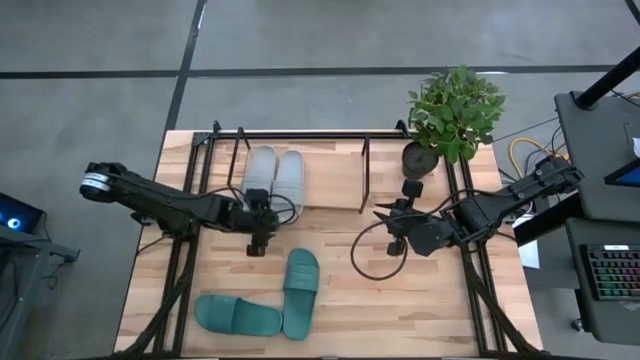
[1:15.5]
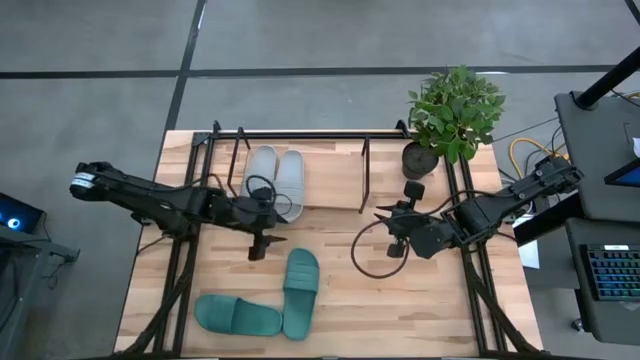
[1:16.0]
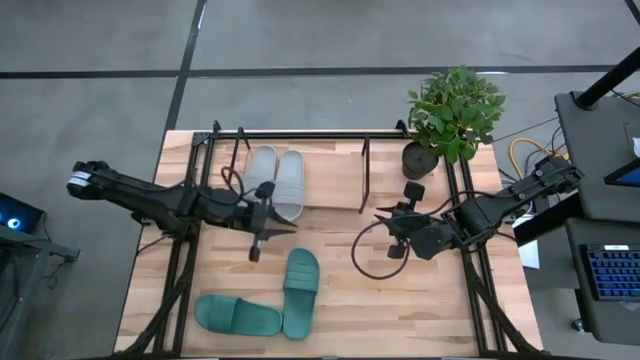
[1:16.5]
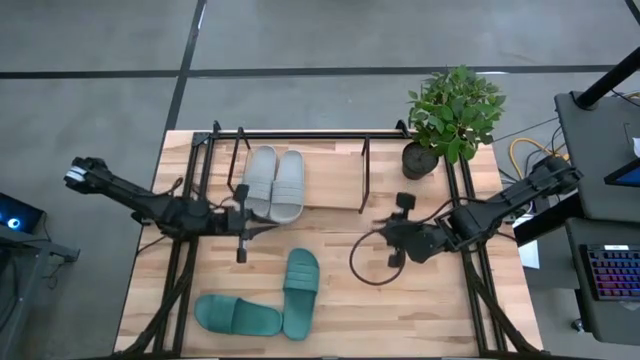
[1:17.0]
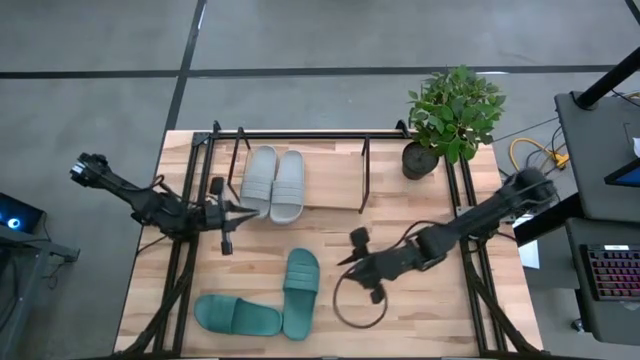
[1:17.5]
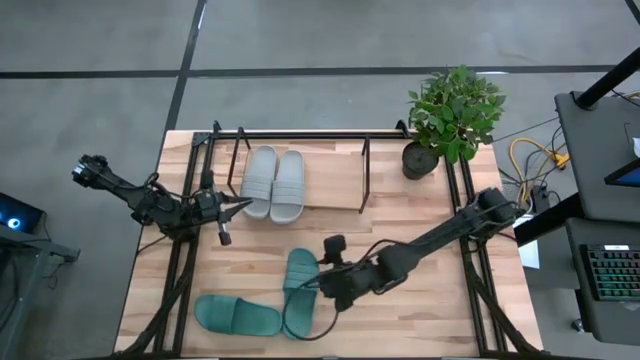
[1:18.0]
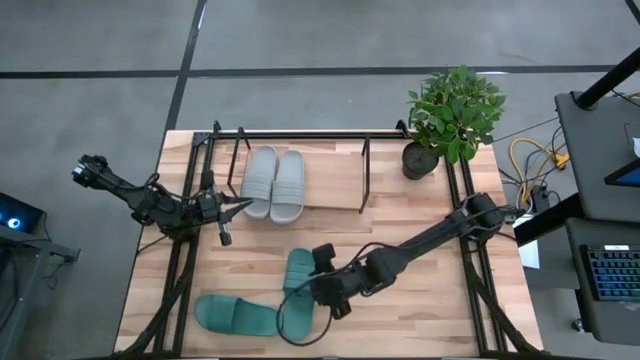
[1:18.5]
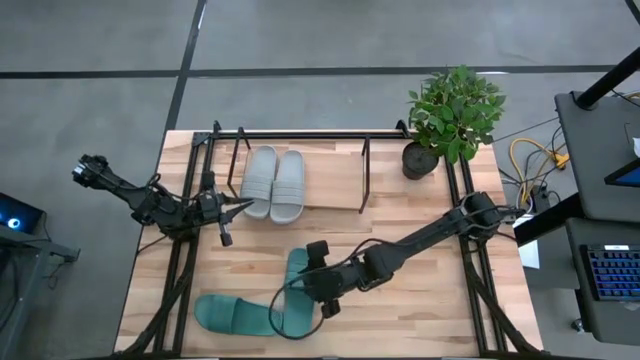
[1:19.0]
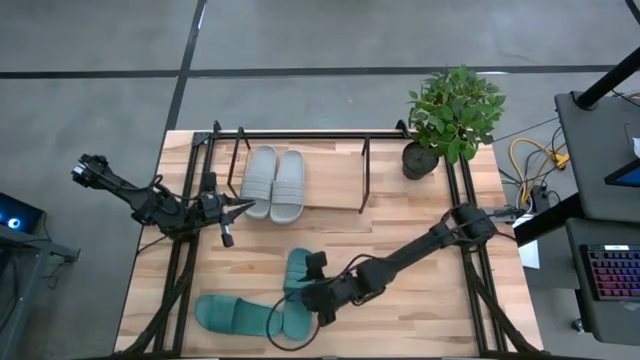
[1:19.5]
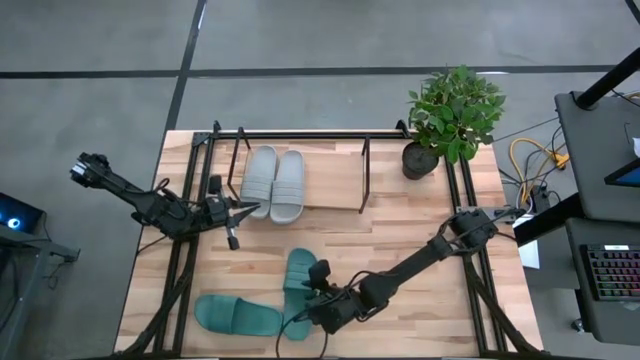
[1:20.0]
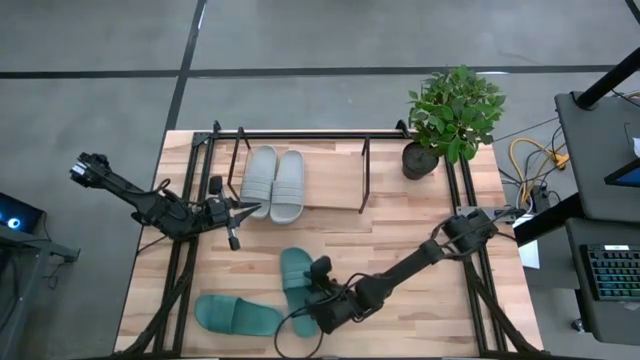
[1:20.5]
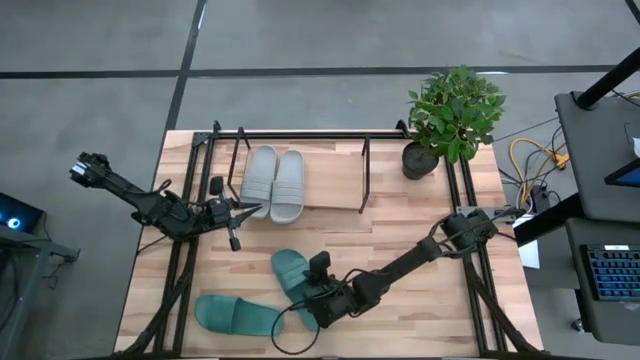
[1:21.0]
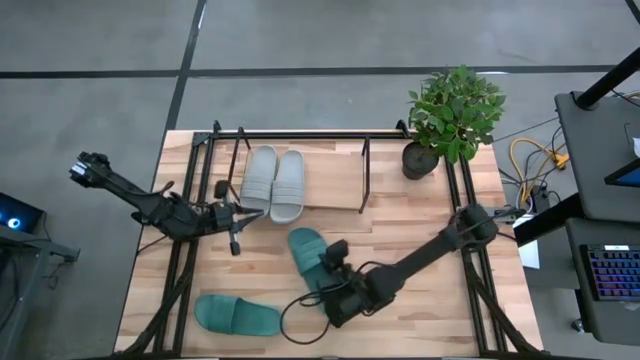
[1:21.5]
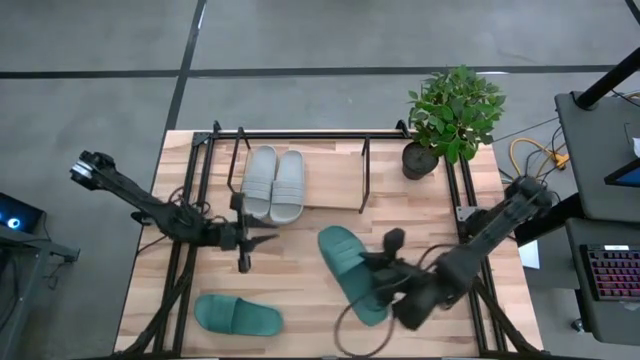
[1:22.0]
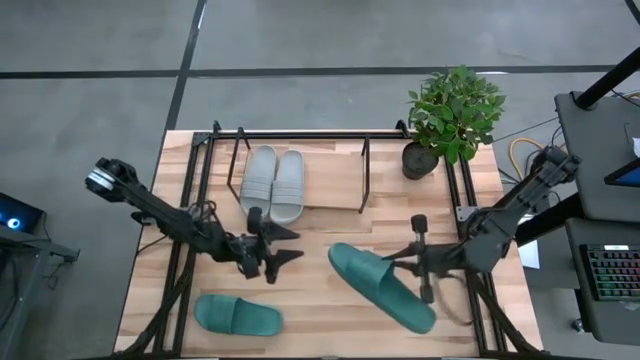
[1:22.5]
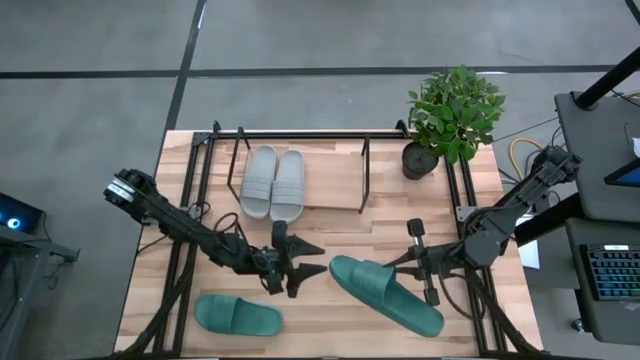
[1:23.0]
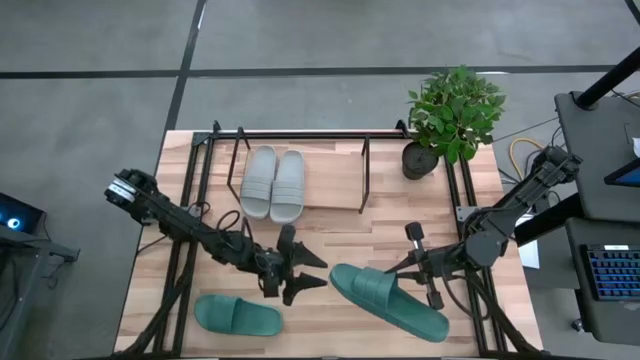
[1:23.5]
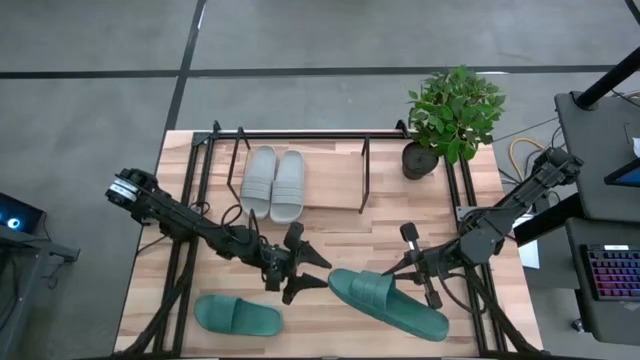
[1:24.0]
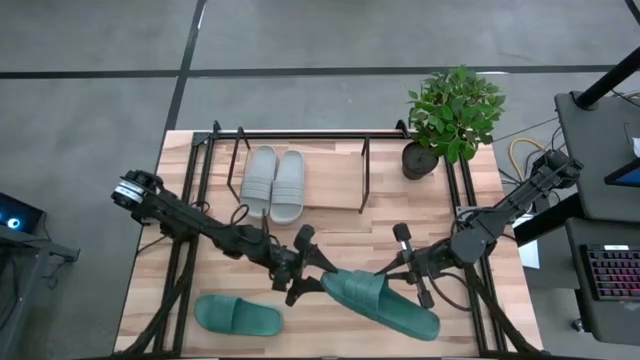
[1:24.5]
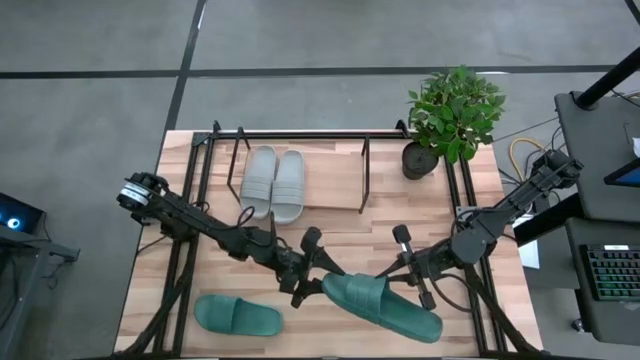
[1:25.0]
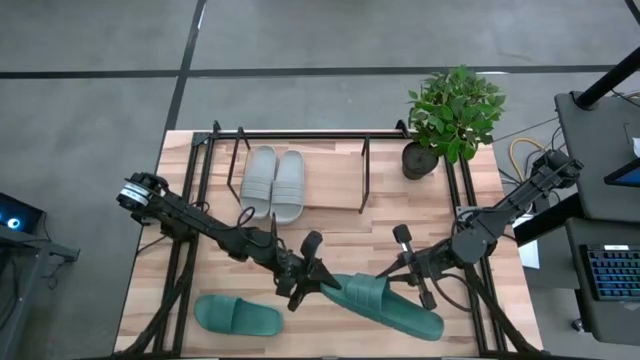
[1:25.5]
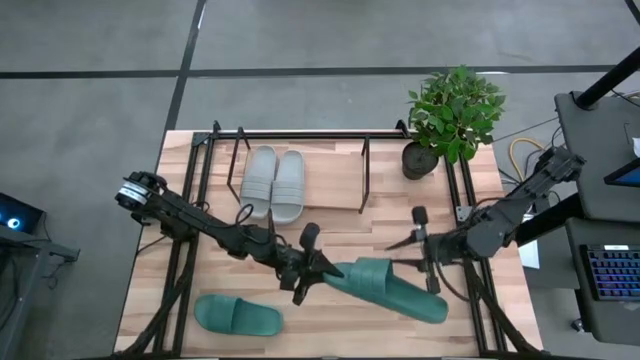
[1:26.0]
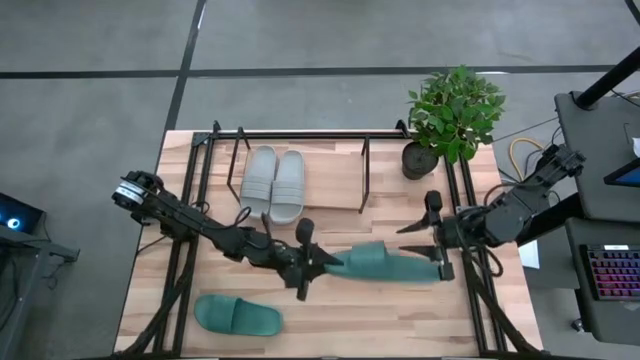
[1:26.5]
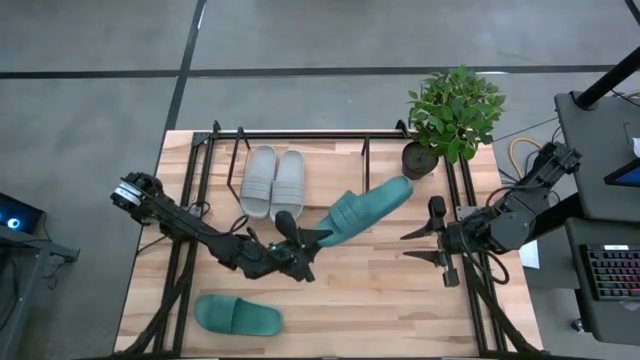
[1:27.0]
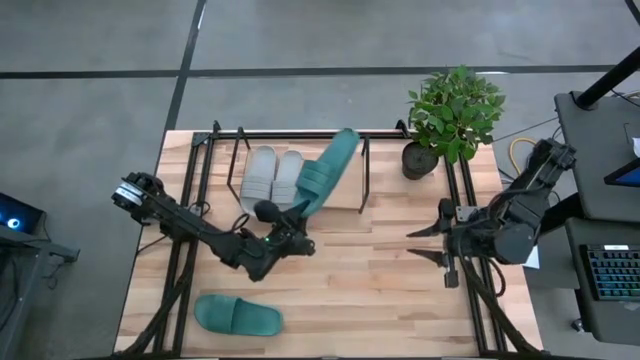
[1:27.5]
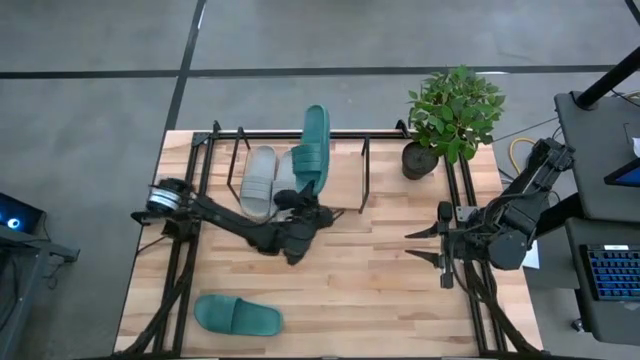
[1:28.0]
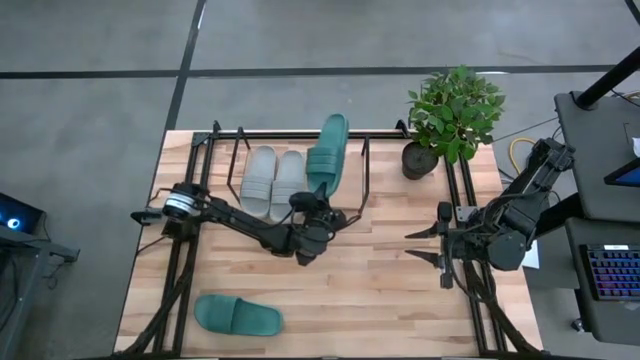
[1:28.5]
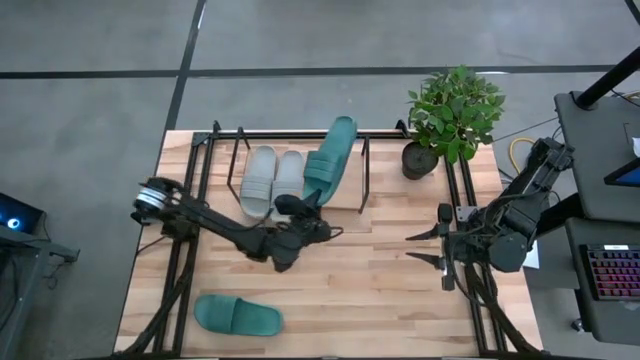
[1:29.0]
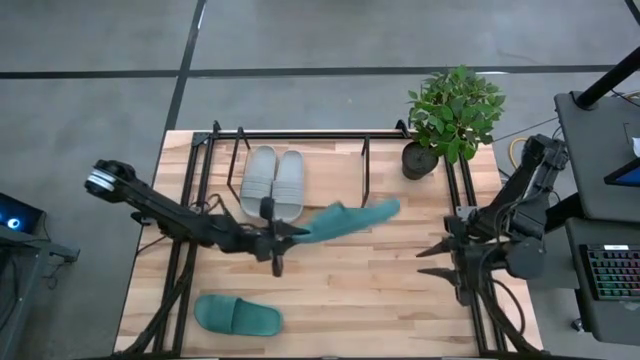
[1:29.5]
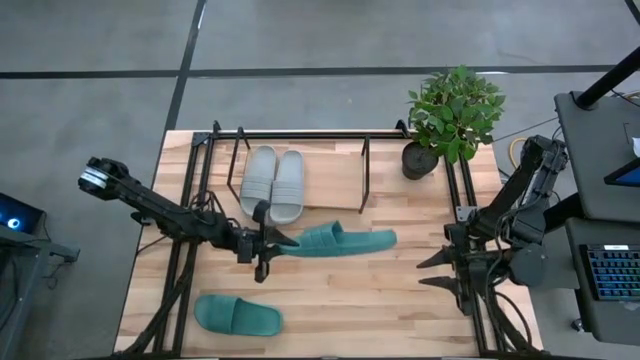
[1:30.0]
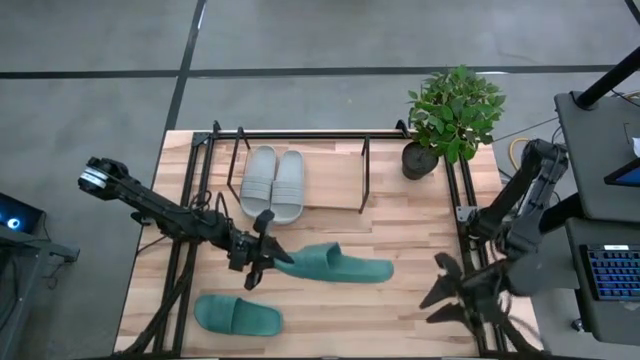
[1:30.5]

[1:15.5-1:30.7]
Task: Pick and place slides into the shelf
Put the right green slide on the shelf
